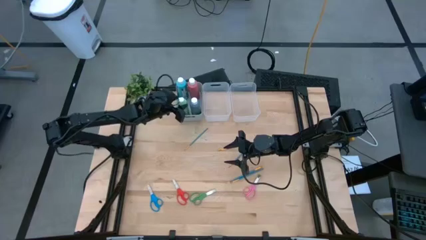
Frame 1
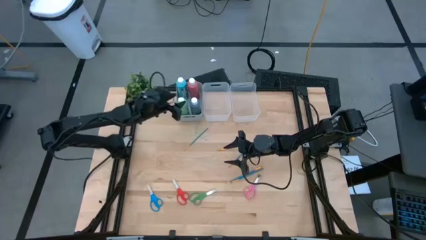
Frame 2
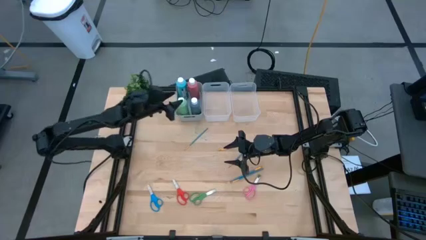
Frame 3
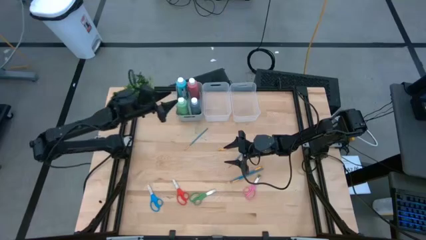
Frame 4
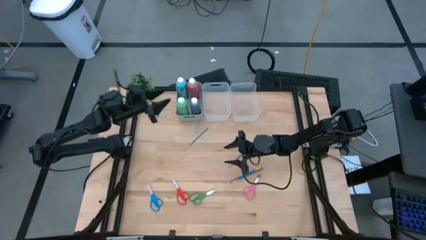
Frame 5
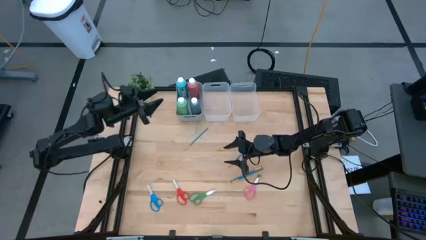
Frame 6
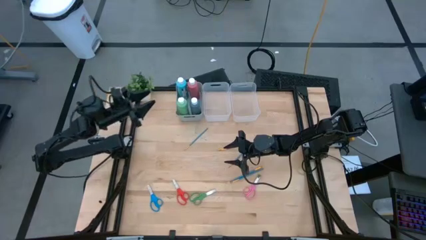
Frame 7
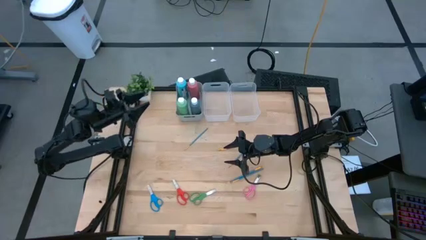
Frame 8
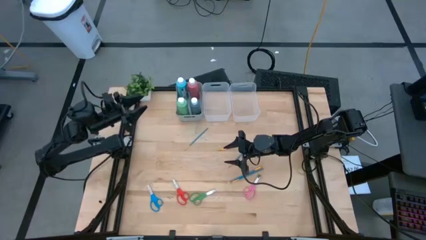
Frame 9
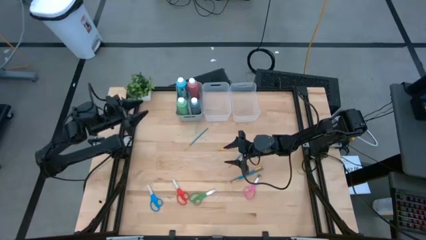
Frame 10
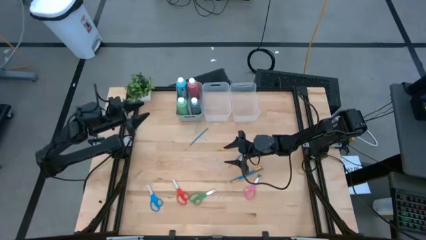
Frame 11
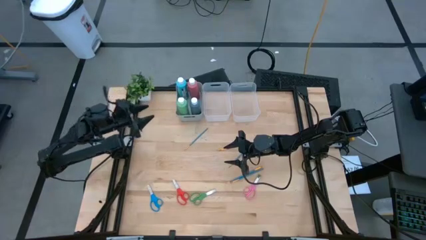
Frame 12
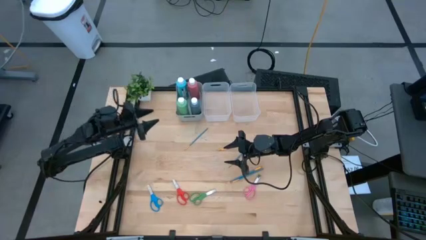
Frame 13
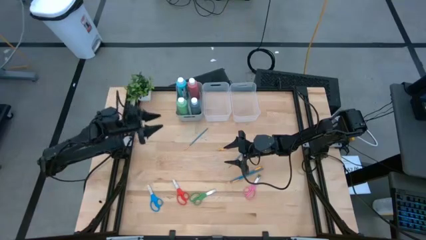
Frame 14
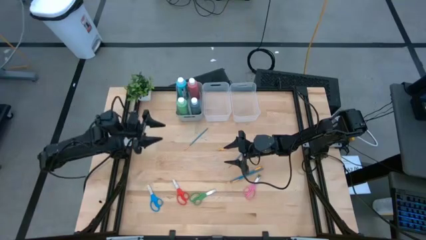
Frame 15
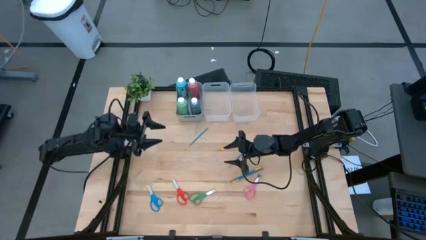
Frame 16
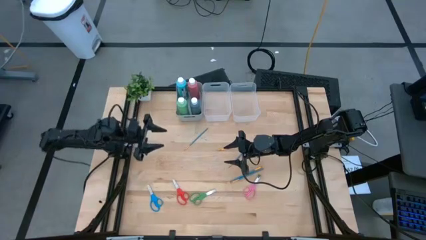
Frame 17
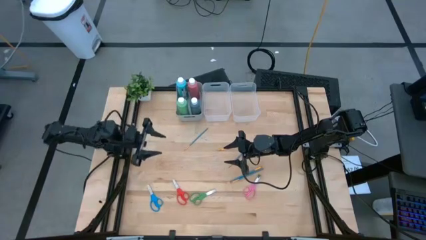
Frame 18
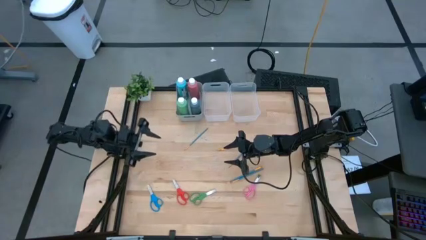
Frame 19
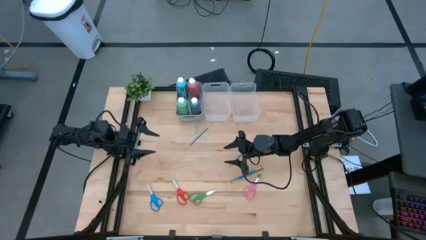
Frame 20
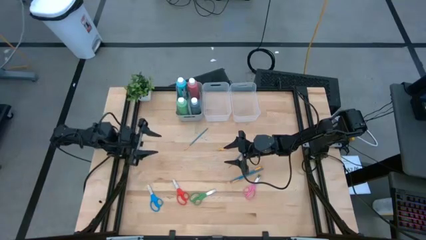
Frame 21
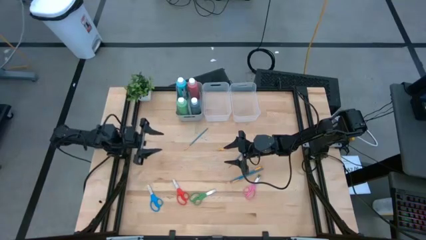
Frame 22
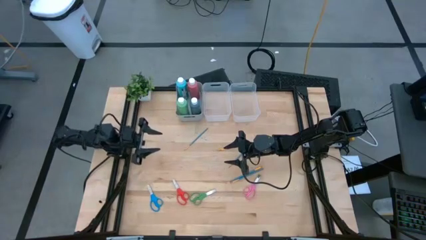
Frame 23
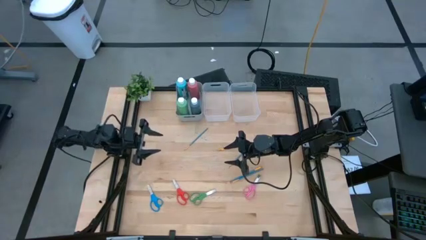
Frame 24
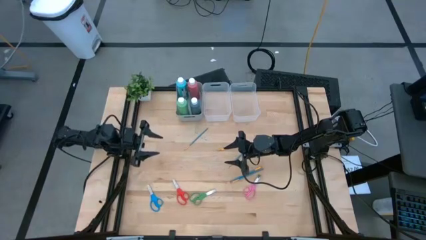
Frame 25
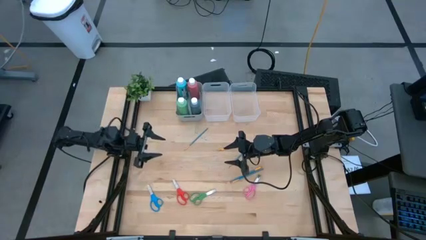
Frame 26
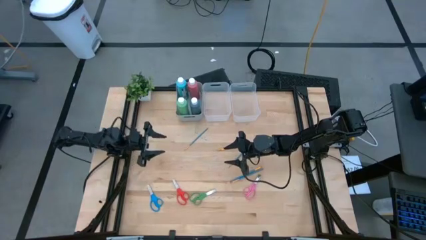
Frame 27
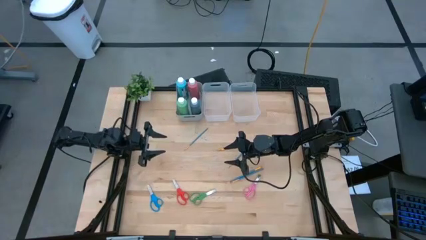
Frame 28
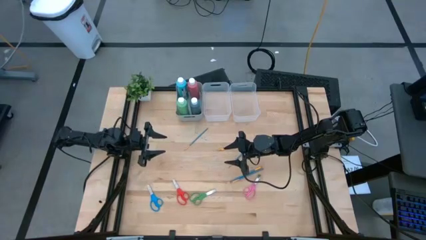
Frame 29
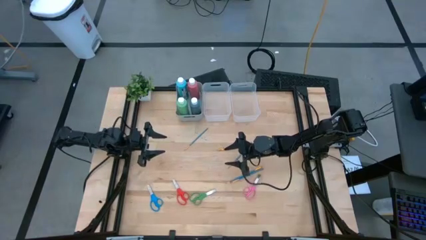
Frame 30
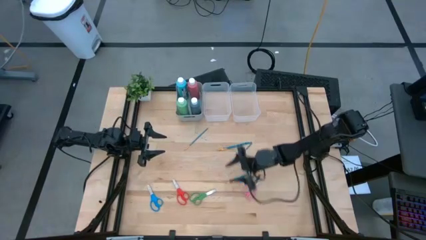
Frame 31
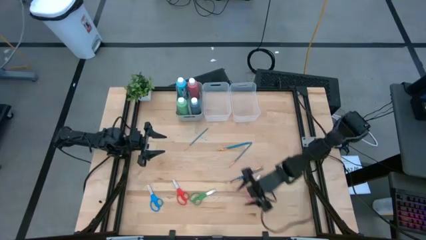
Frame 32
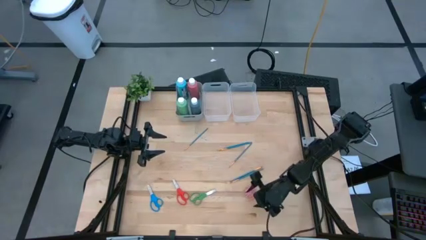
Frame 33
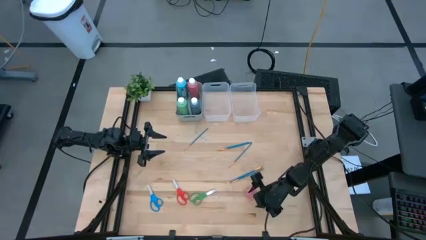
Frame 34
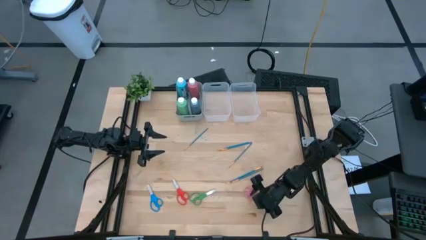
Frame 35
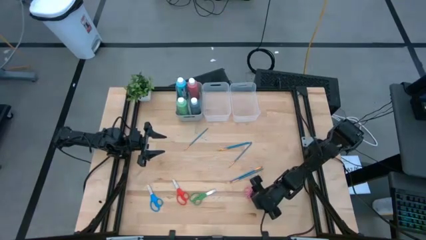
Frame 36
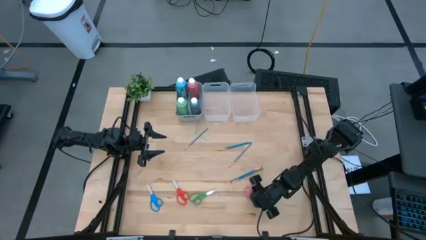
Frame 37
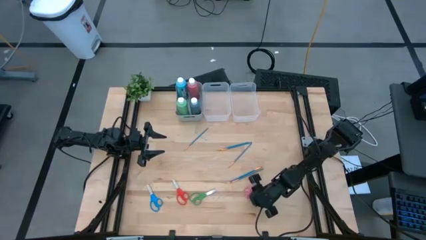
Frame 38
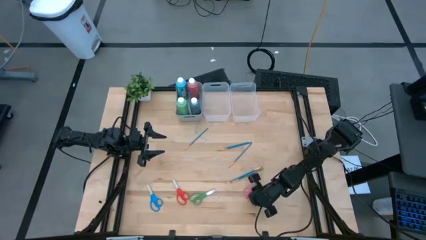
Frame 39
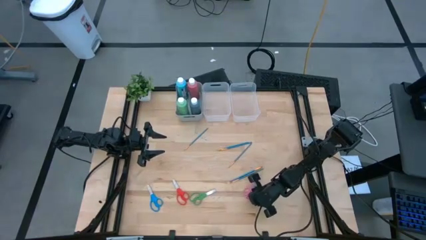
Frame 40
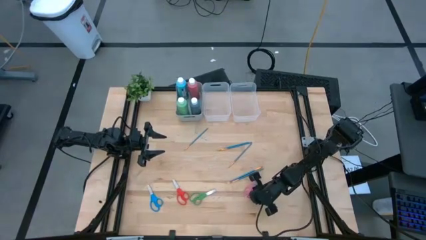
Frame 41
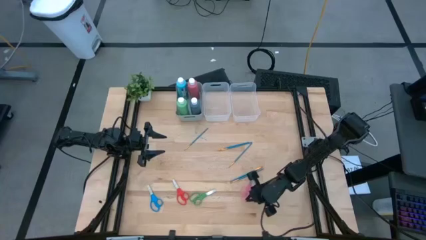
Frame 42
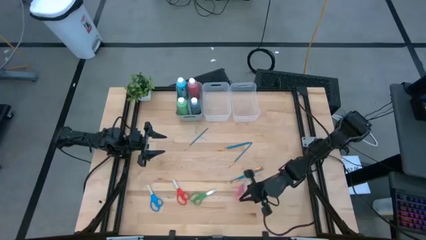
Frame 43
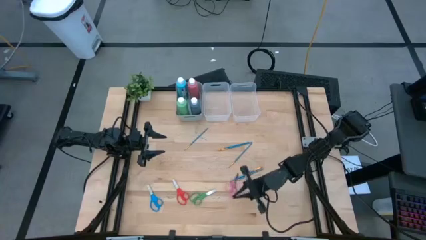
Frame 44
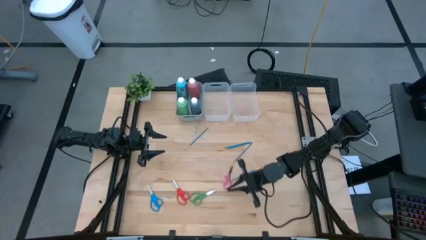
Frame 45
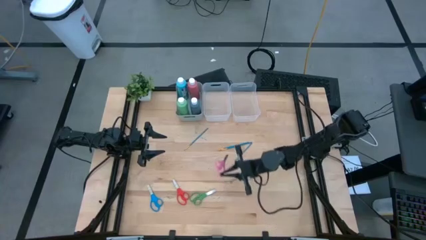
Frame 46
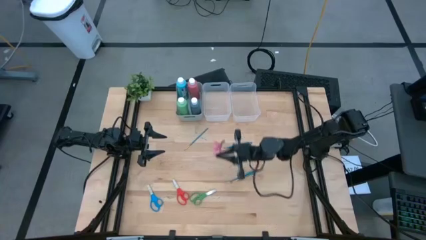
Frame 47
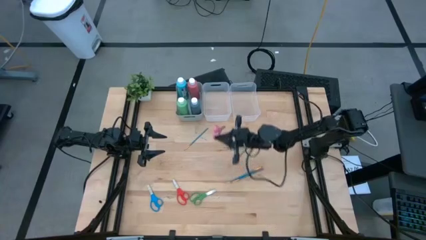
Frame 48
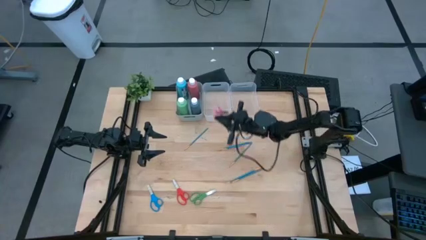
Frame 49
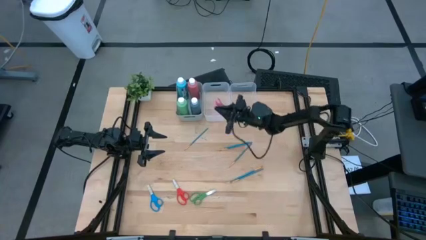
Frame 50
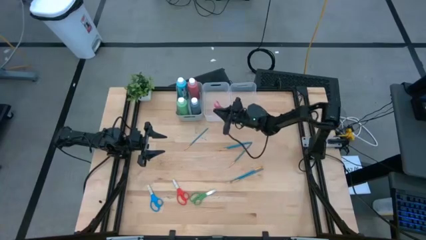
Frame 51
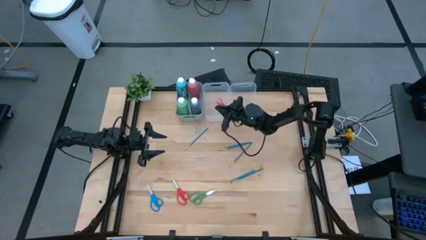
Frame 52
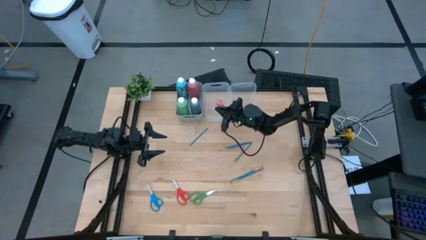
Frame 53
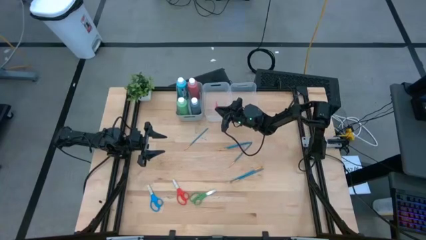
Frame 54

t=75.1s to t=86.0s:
Task: Pick & Place Paint Supplies
Put the pink scissors into the left transparent bin
